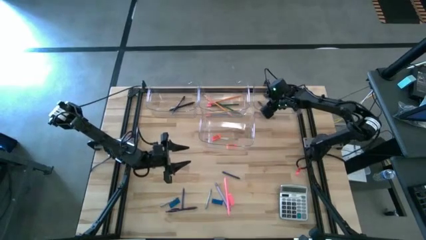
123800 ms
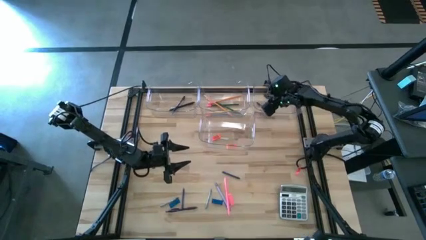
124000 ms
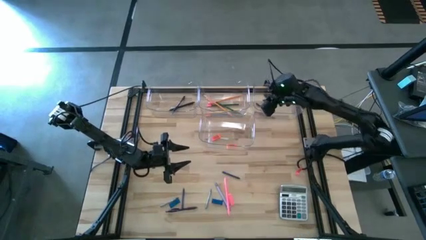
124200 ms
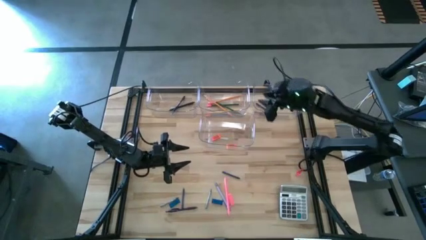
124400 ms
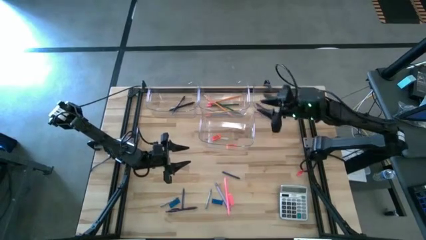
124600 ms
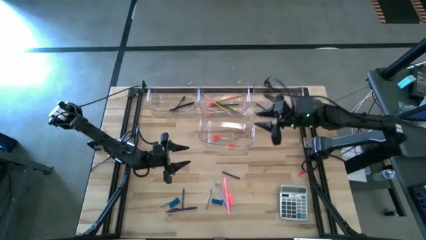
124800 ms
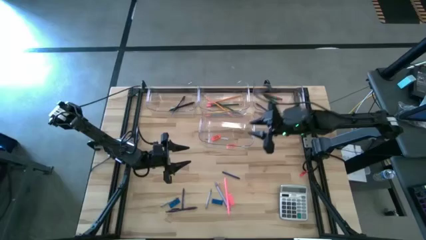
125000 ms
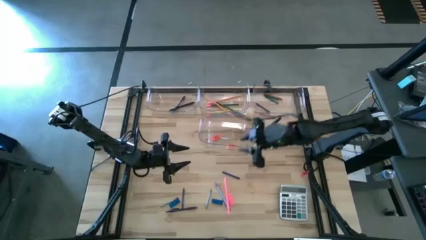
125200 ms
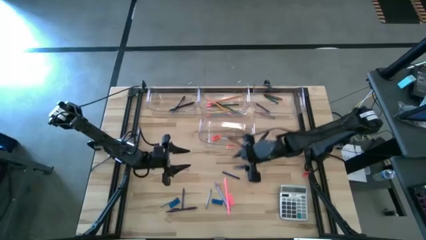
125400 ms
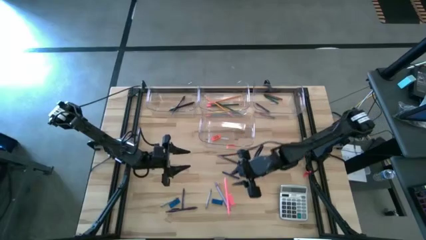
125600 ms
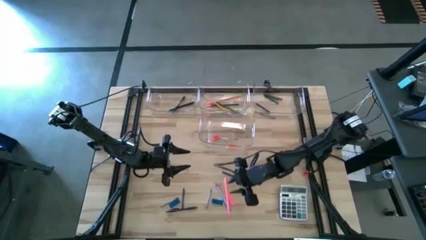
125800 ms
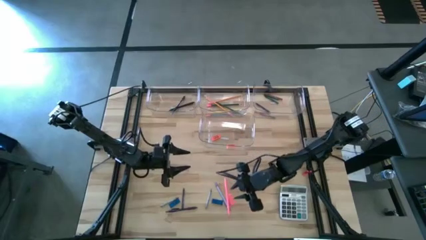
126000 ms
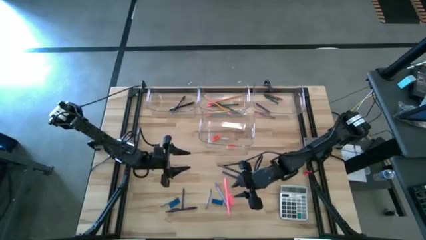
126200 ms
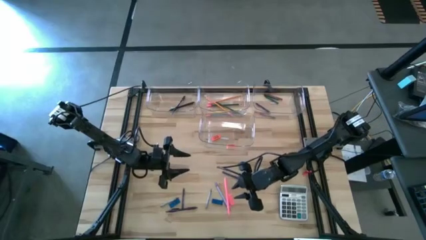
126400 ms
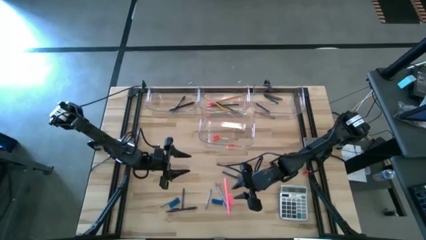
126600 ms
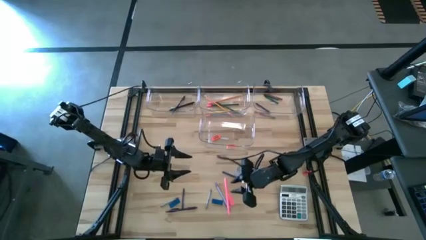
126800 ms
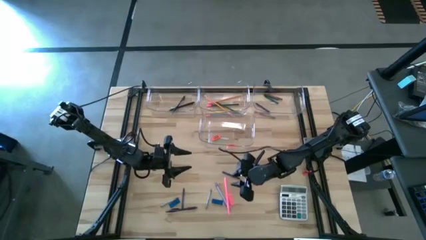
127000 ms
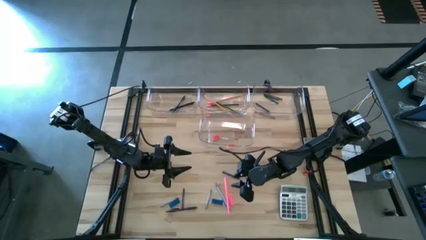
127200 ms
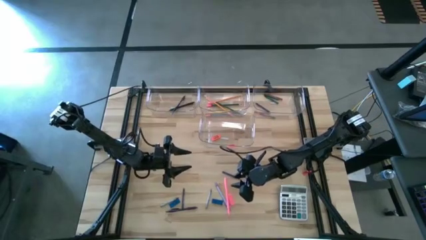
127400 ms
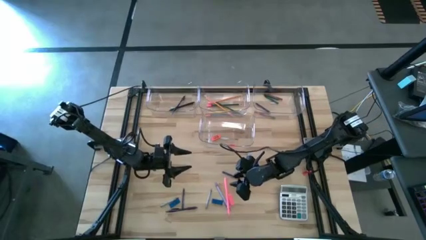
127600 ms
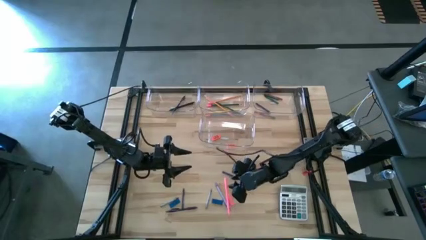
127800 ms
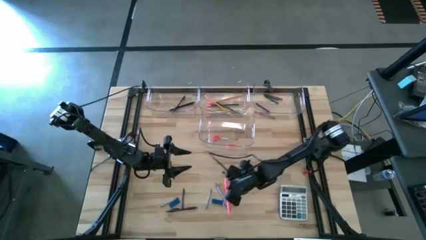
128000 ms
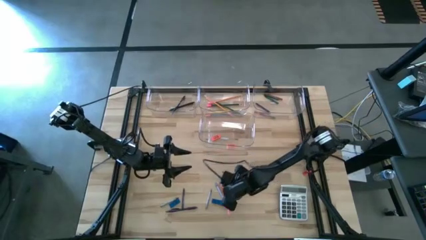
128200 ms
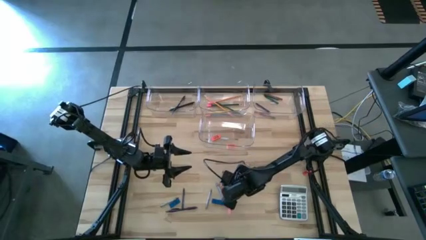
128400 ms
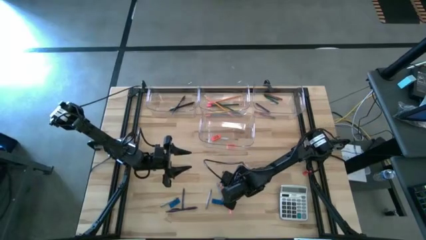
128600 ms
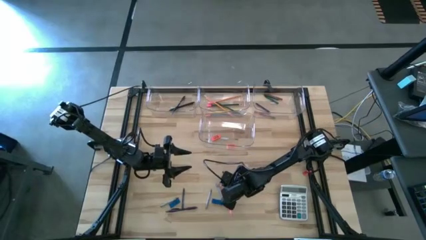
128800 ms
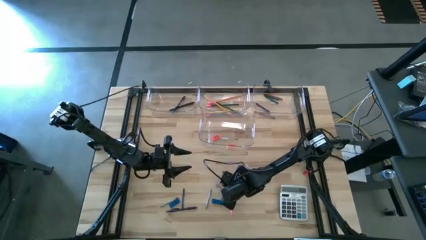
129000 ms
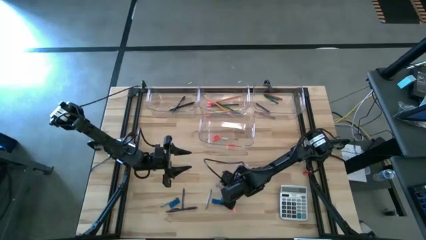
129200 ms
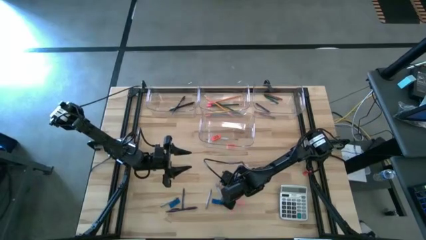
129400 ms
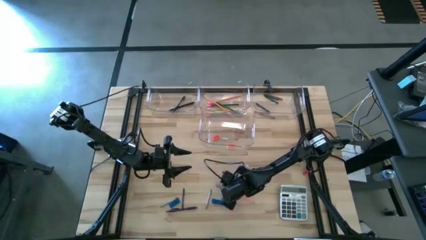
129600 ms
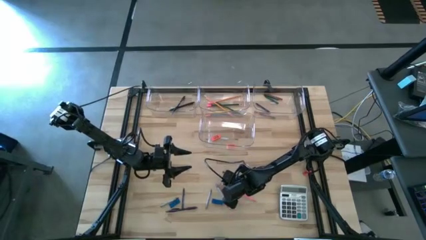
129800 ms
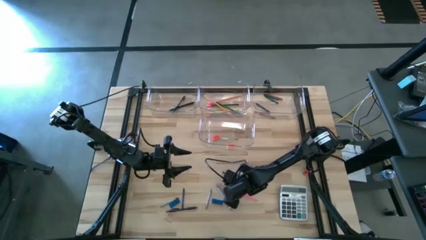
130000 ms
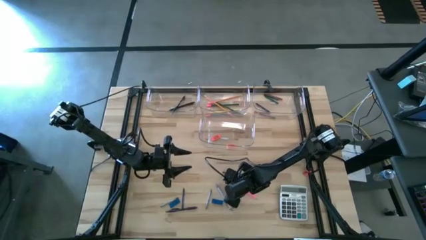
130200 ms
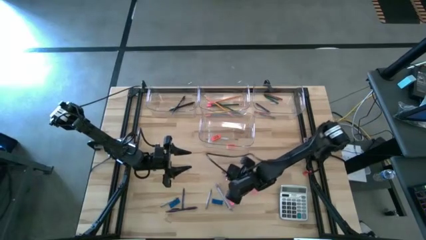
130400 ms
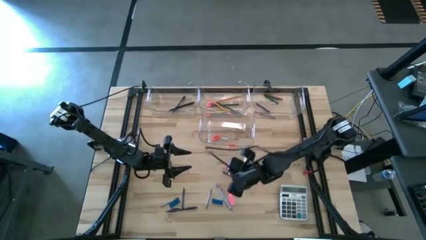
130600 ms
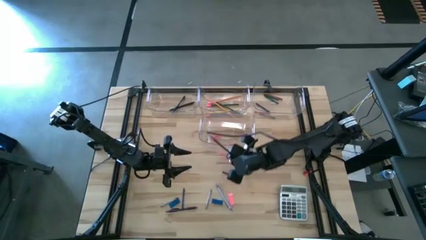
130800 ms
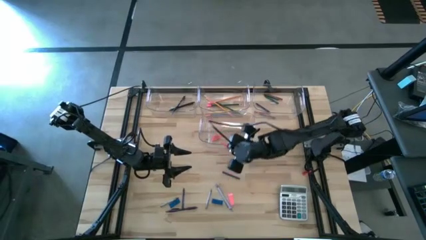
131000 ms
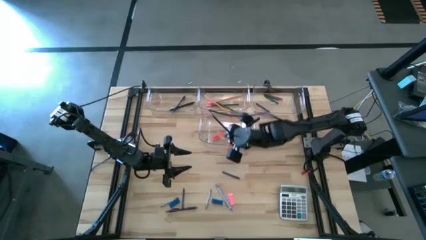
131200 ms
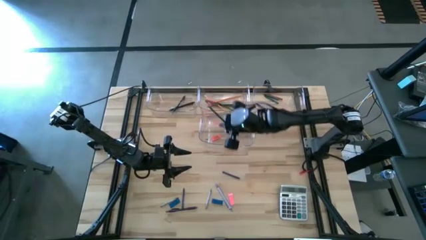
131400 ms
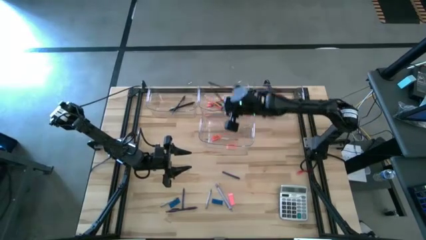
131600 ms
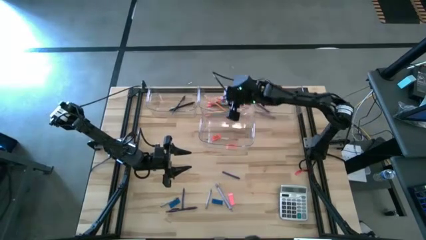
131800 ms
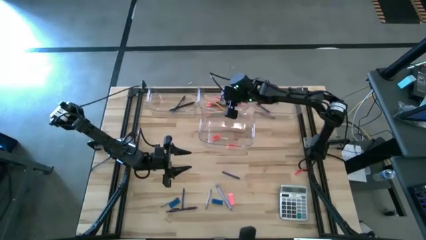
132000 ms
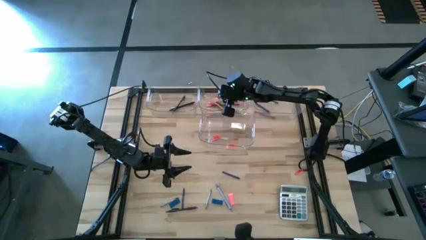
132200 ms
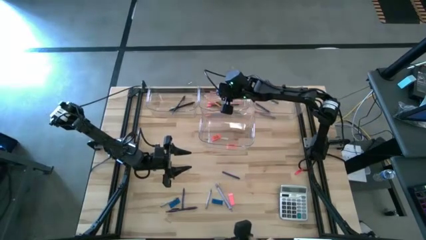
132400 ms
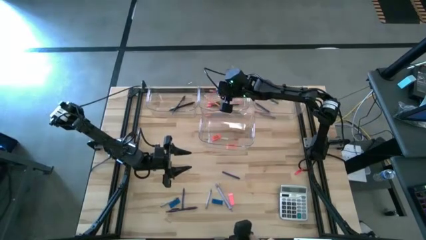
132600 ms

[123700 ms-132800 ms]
Task: Sort crayons/erasers/pens/pencils in bins
Put the pink pencil into the top center transparent bin

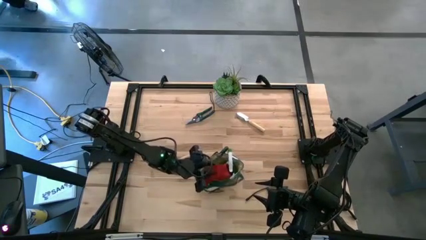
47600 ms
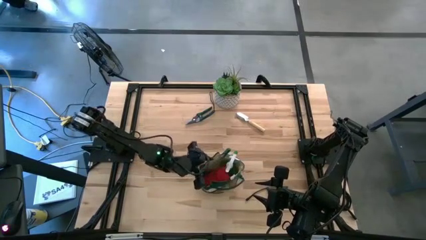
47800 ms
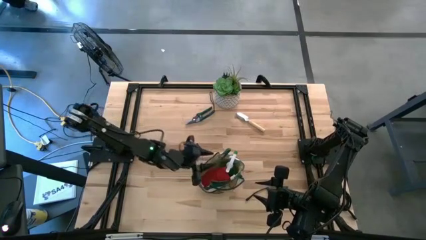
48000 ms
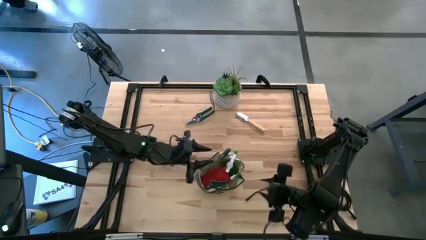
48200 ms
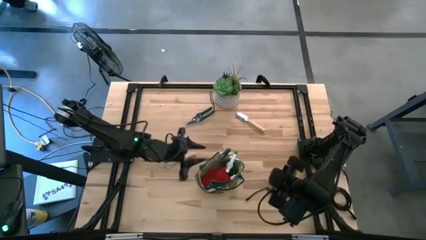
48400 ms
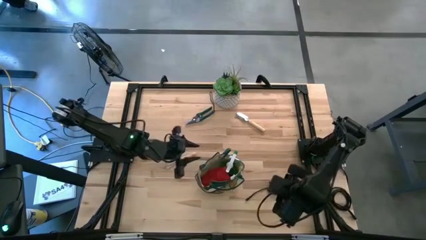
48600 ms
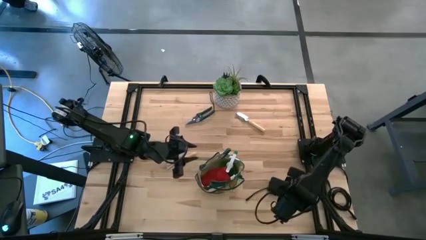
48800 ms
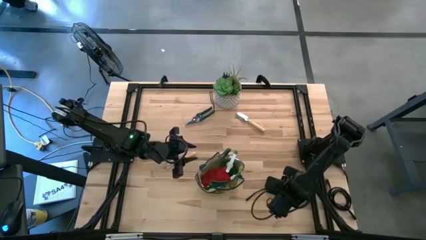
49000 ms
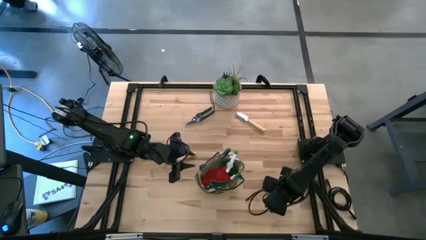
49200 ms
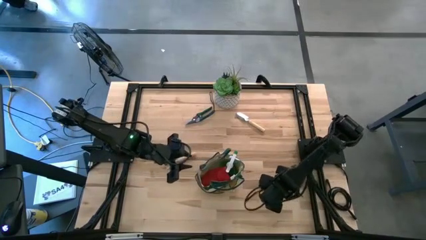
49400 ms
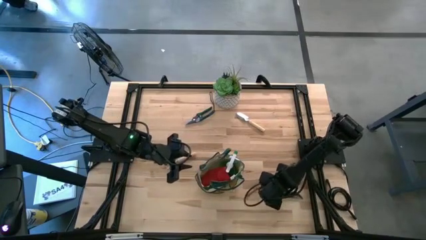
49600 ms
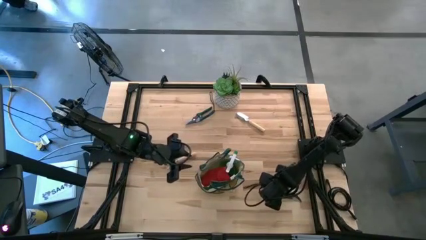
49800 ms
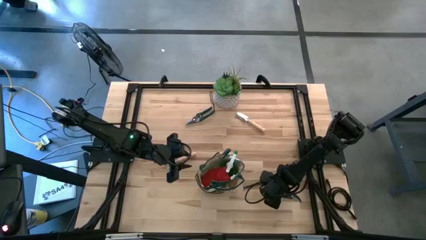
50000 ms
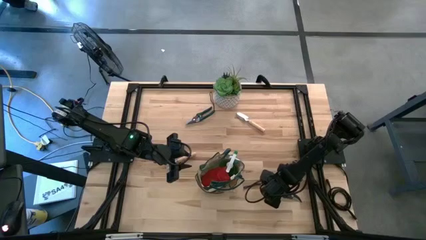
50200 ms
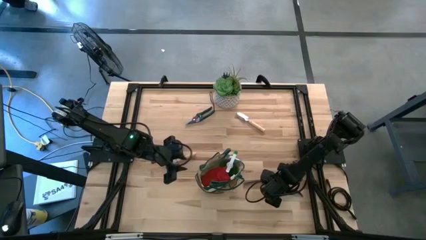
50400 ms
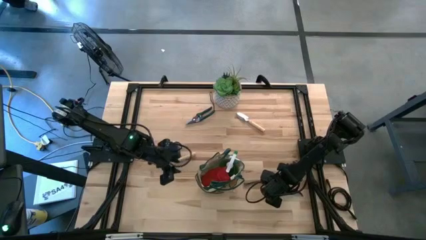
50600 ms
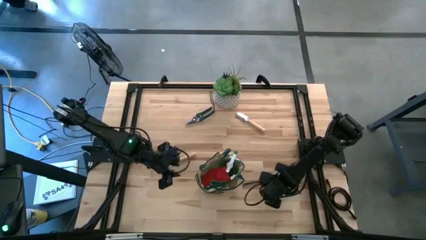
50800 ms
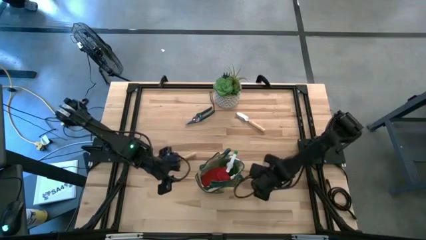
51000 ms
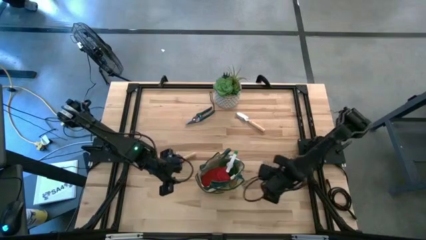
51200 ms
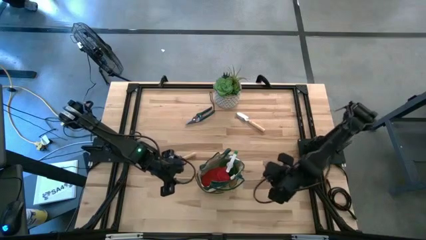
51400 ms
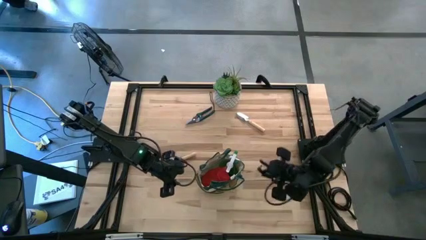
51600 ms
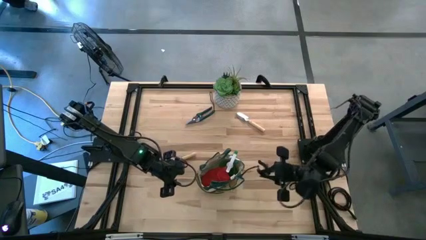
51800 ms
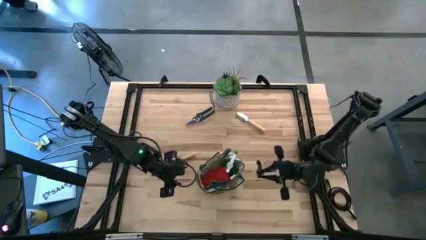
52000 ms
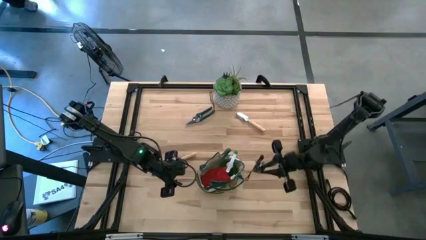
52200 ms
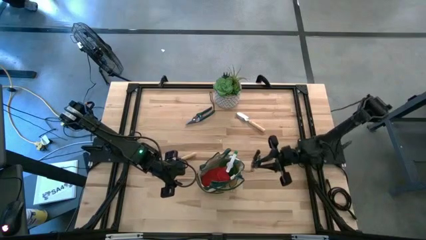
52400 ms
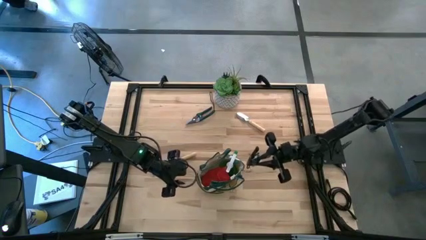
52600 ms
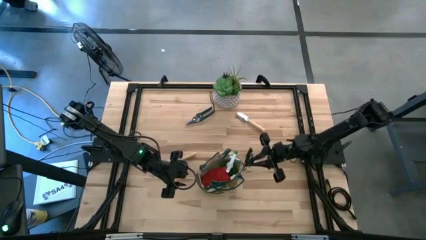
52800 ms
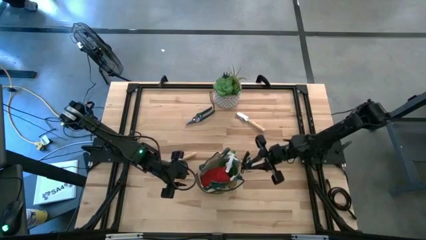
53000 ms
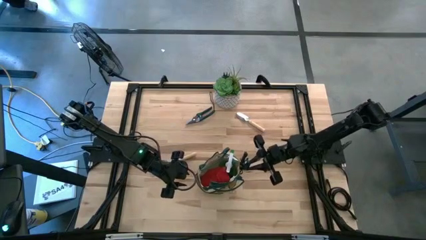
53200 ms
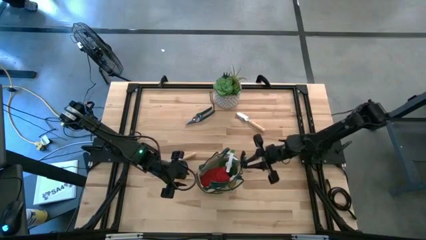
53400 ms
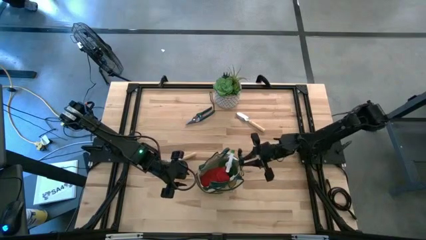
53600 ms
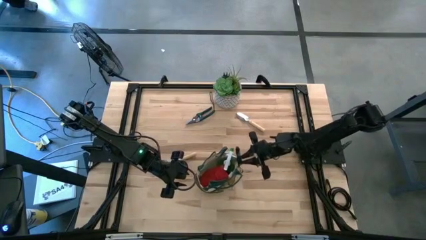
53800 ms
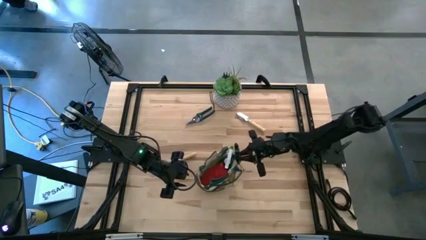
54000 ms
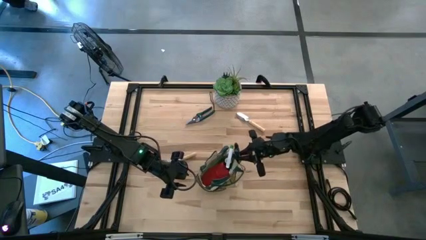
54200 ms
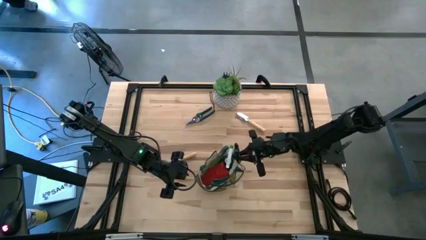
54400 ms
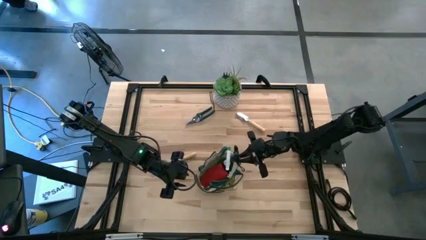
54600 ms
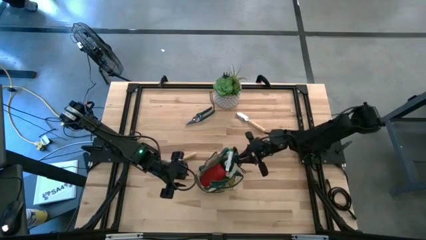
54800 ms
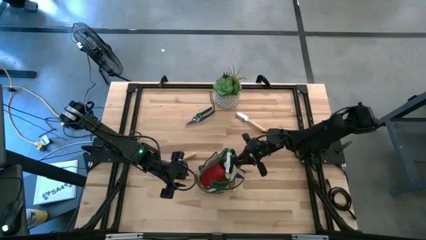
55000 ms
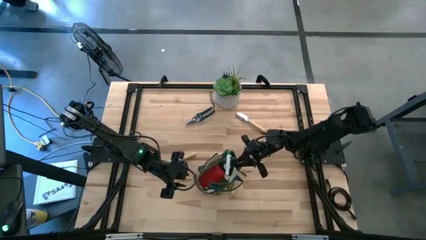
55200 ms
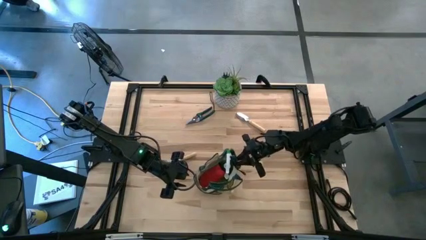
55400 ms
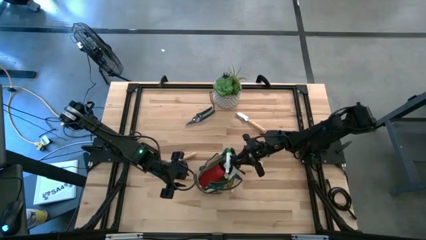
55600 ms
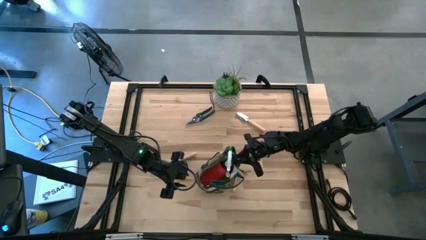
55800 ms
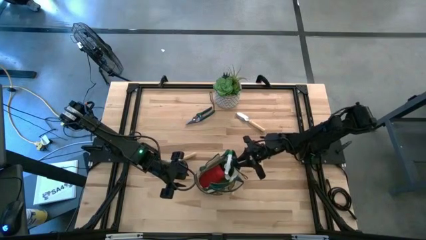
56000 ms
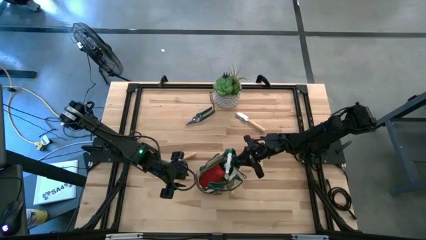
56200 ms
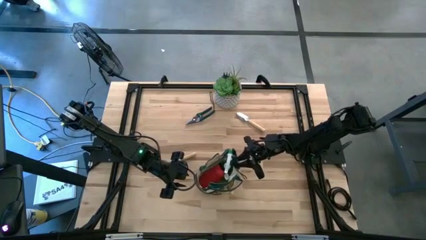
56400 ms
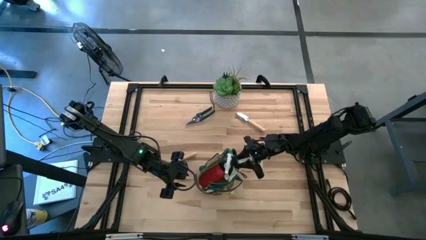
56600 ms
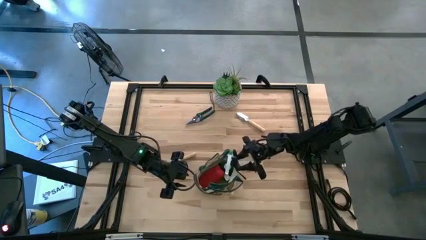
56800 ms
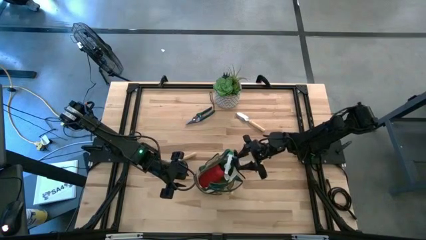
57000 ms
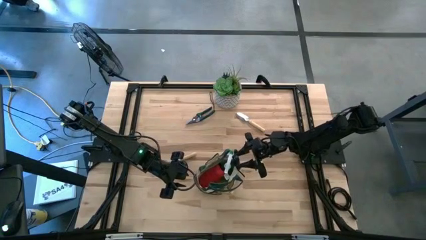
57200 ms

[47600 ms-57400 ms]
Task: Pick & Place Garden tools in Gardening bag
Put the bottom green shear scissors into the green gardening bag
